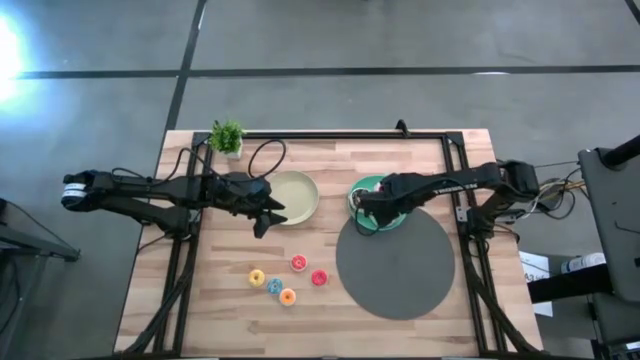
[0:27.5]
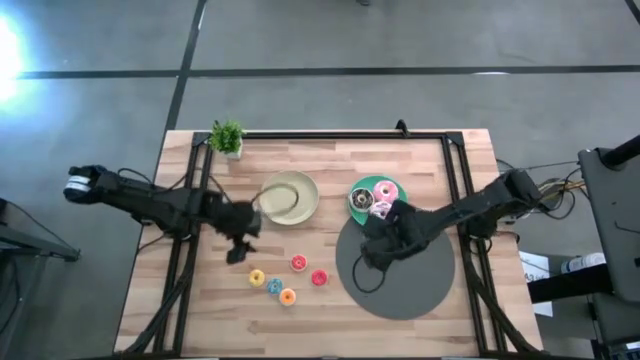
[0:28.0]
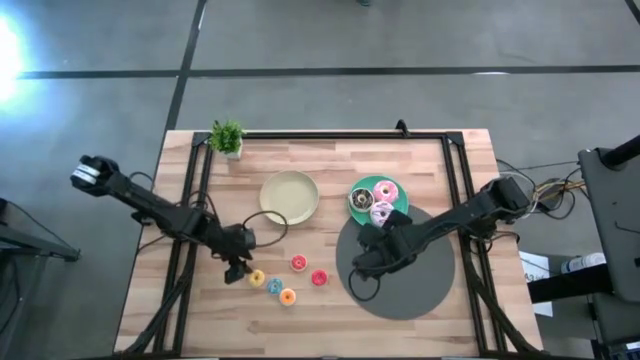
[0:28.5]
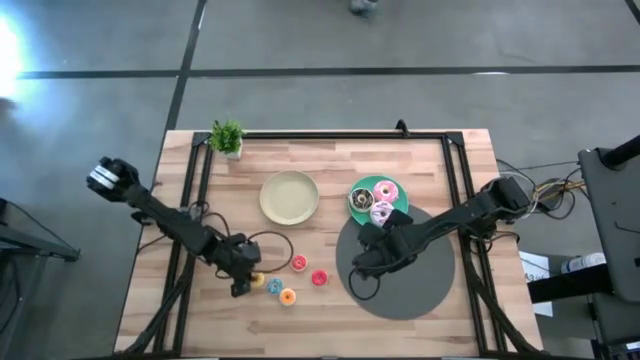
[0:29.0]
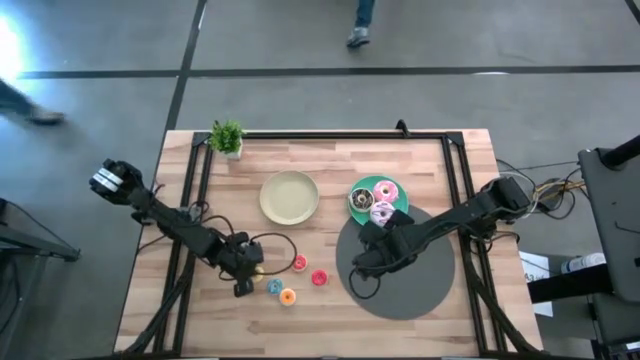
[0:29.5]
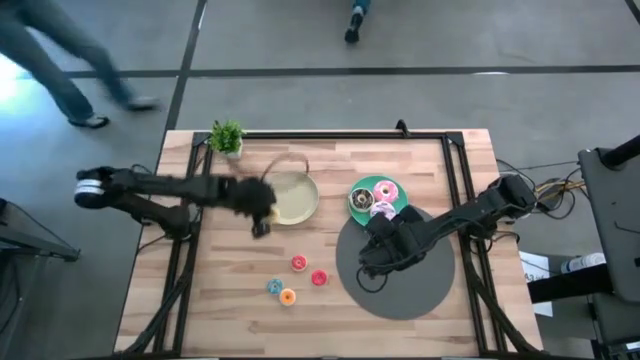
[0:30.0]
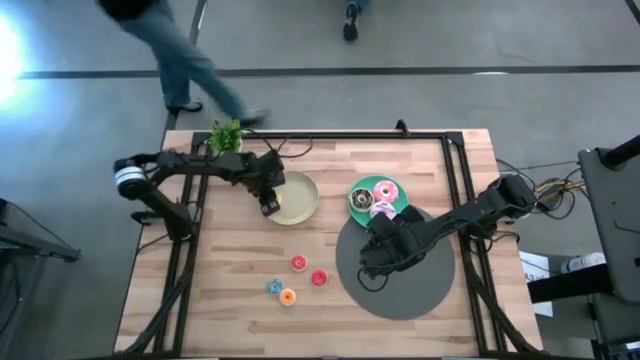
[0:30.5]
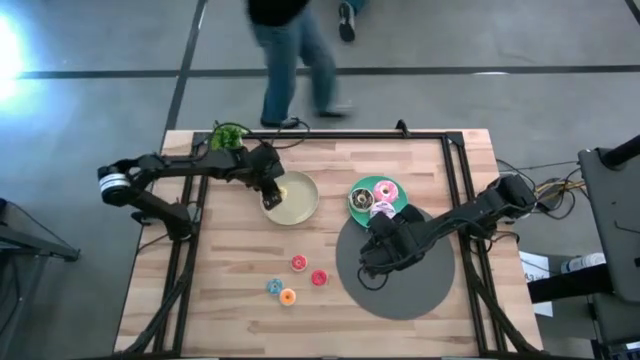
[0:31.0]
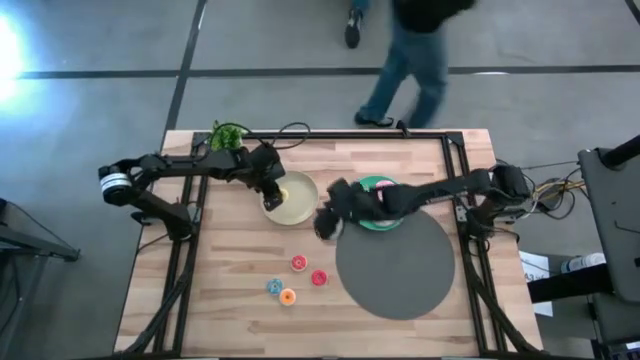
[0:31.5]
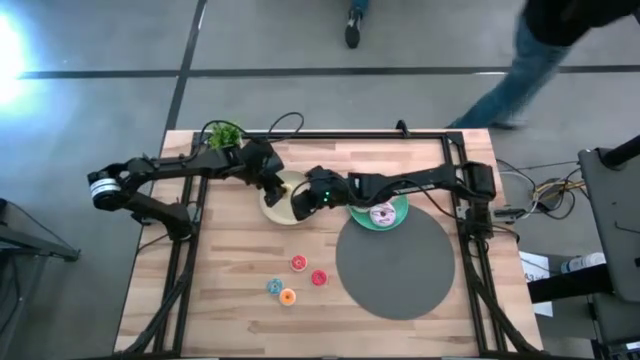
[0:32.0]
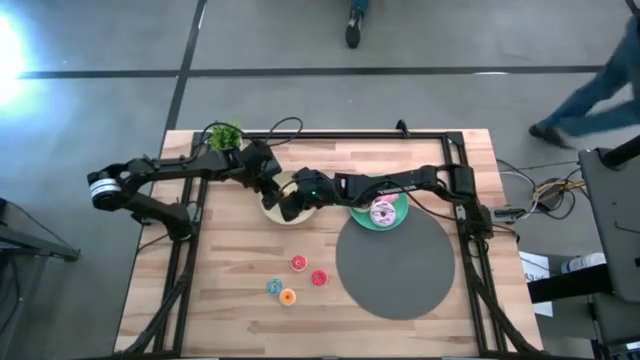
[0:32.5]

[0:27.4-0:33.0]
Task: Pick & Place donuts
Put the small yellow donut on the white plate

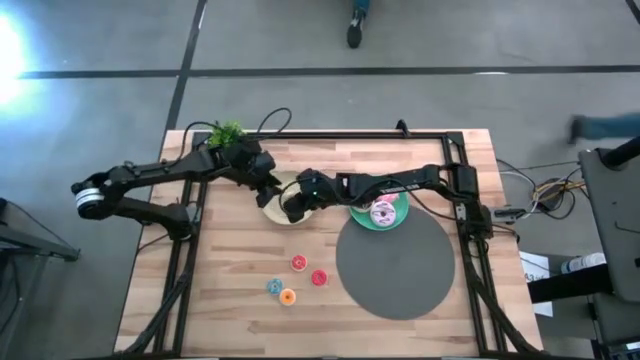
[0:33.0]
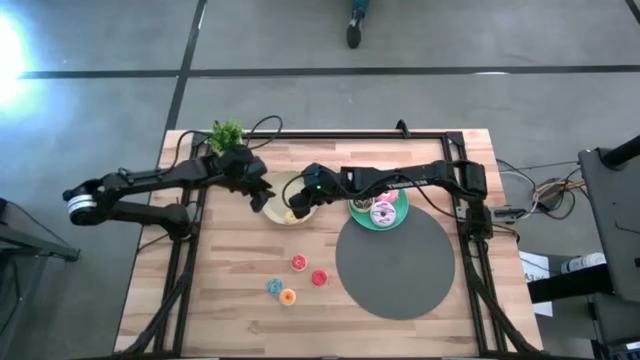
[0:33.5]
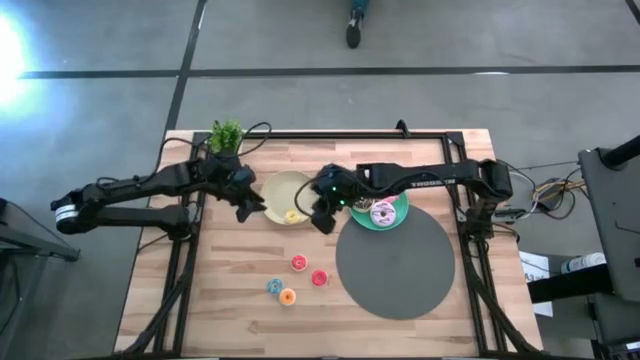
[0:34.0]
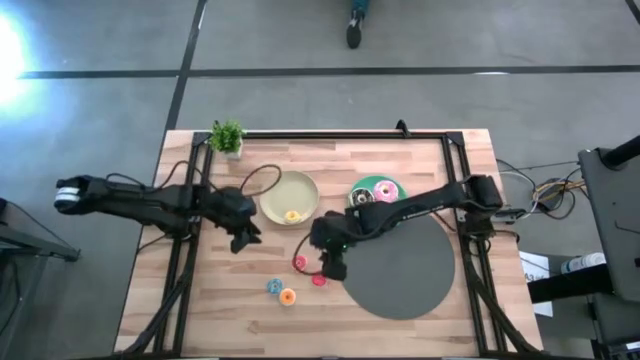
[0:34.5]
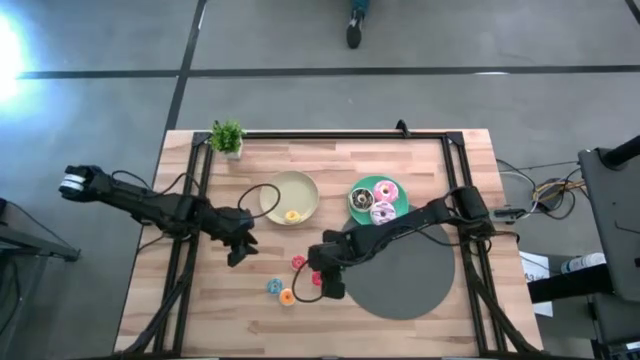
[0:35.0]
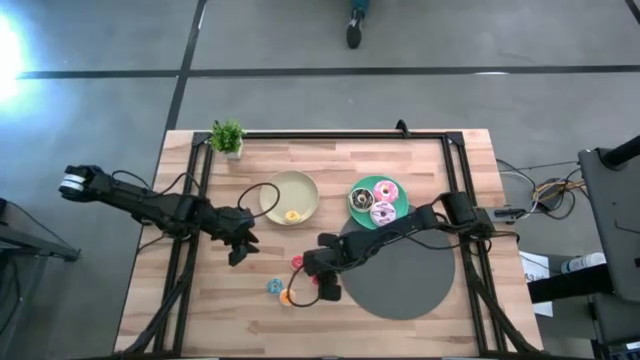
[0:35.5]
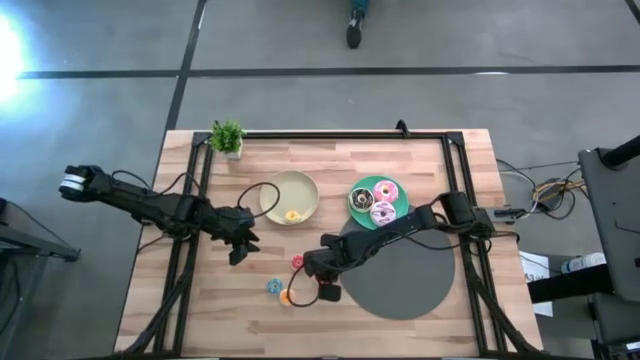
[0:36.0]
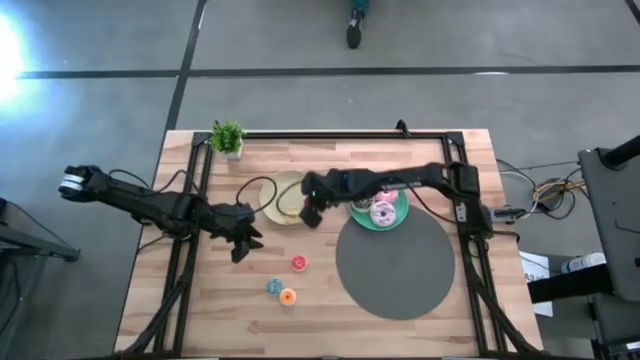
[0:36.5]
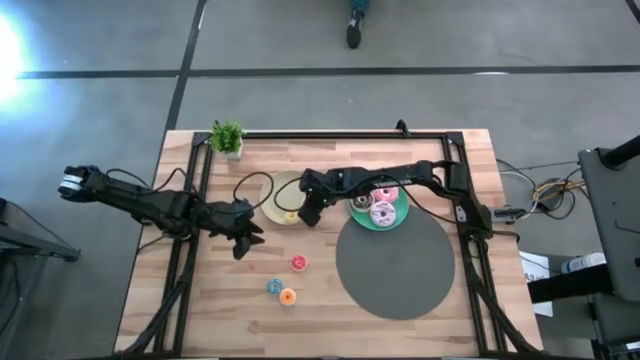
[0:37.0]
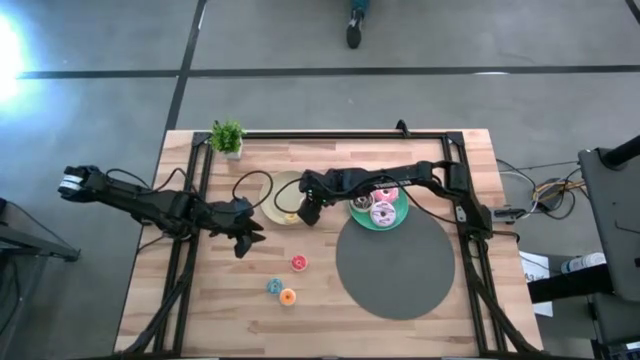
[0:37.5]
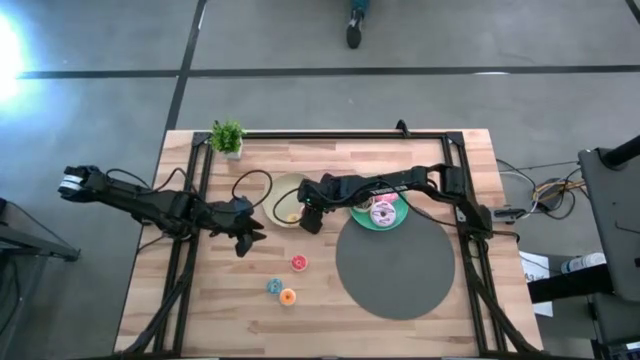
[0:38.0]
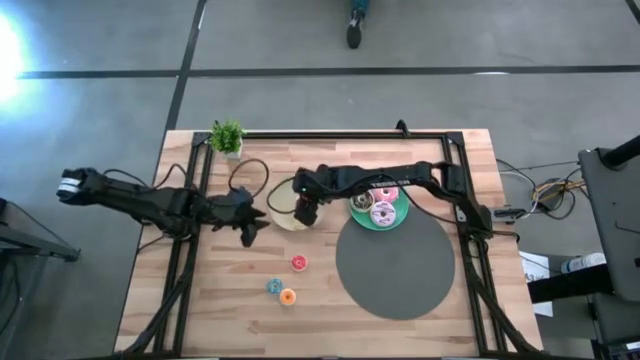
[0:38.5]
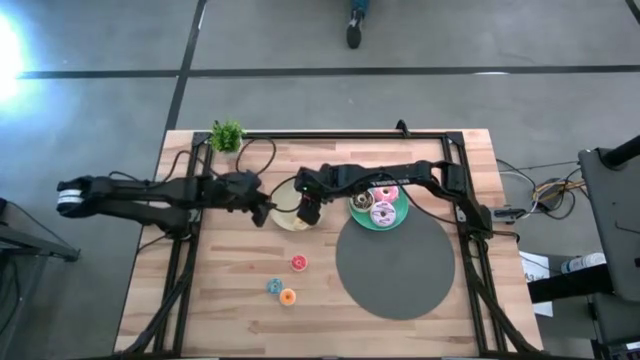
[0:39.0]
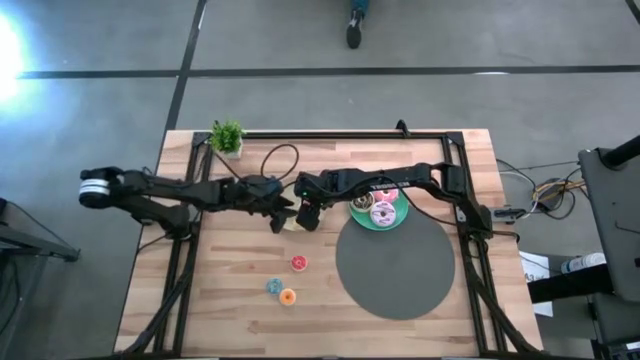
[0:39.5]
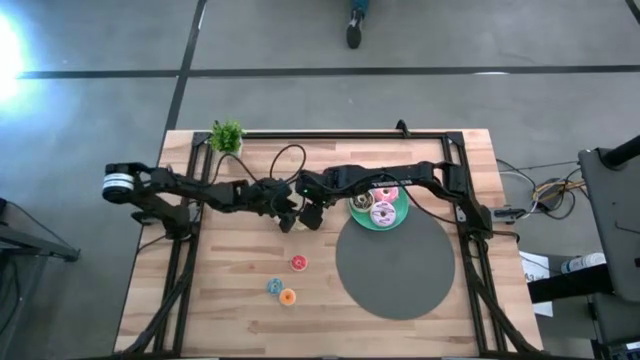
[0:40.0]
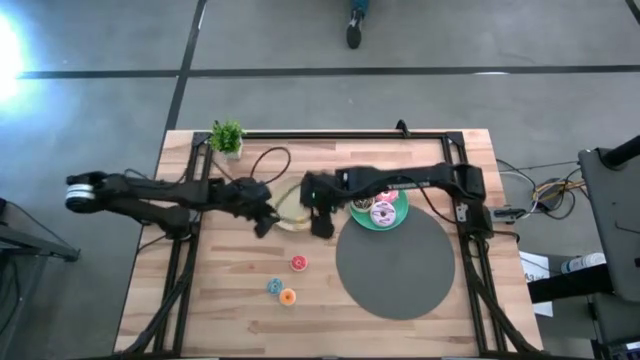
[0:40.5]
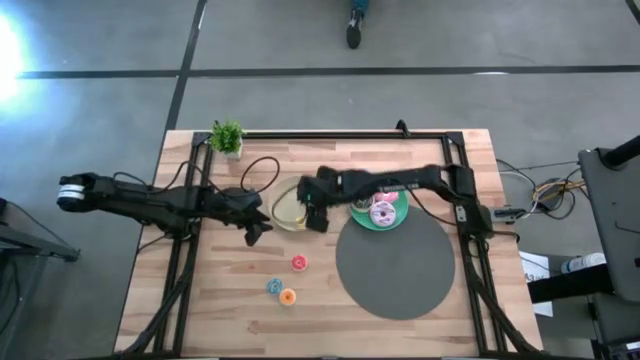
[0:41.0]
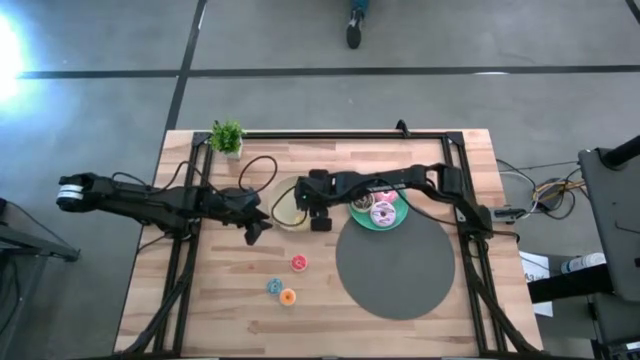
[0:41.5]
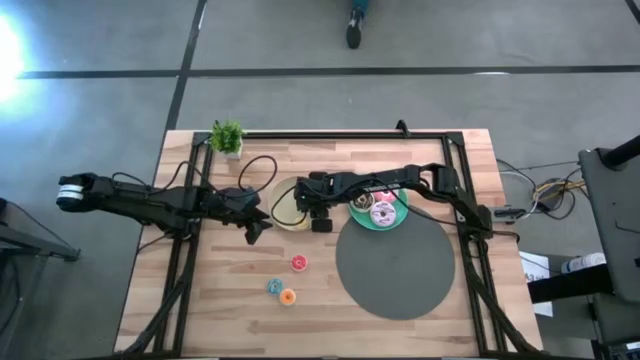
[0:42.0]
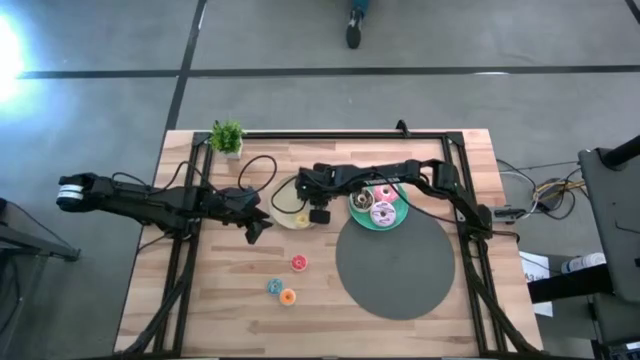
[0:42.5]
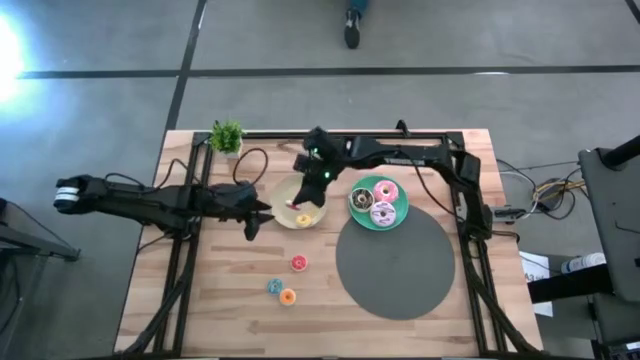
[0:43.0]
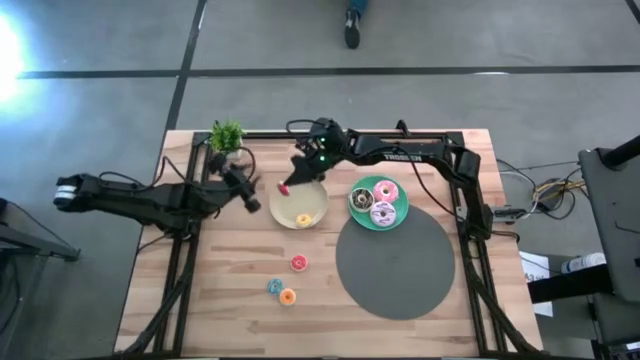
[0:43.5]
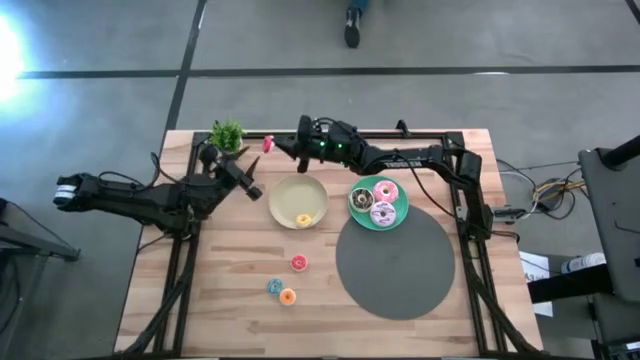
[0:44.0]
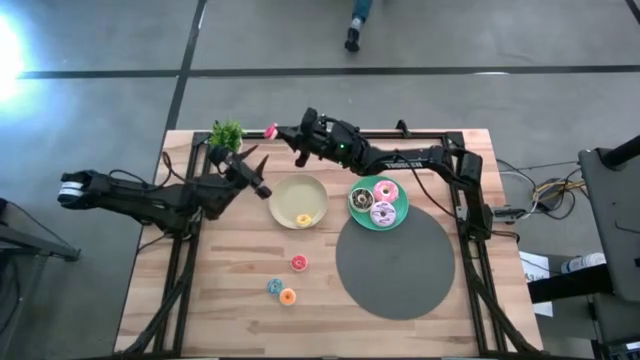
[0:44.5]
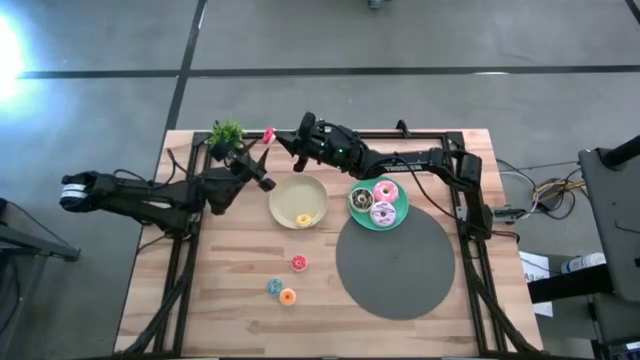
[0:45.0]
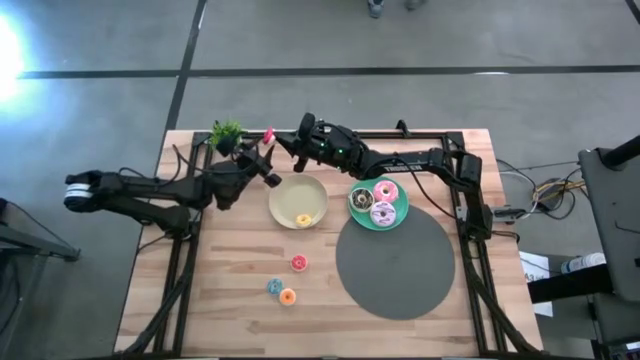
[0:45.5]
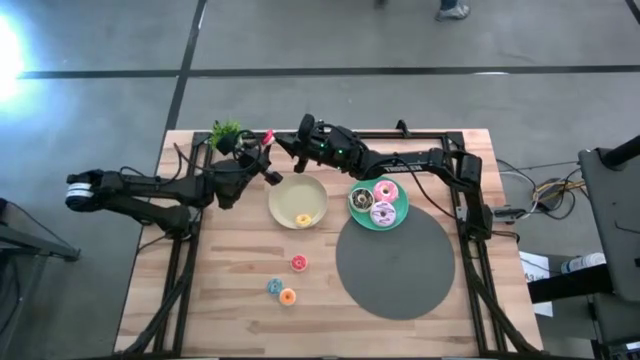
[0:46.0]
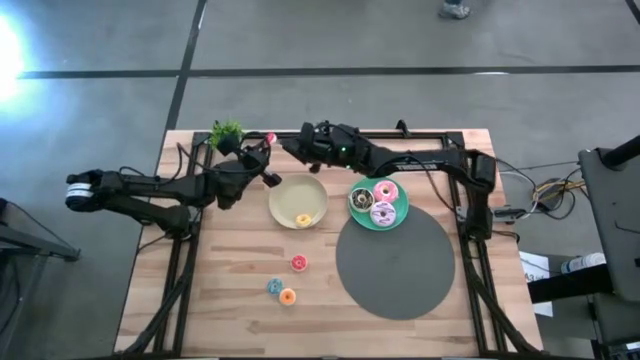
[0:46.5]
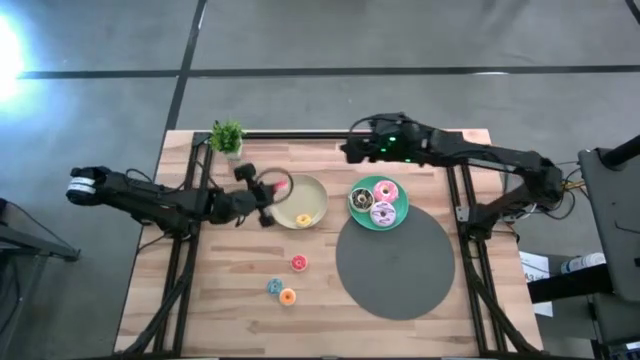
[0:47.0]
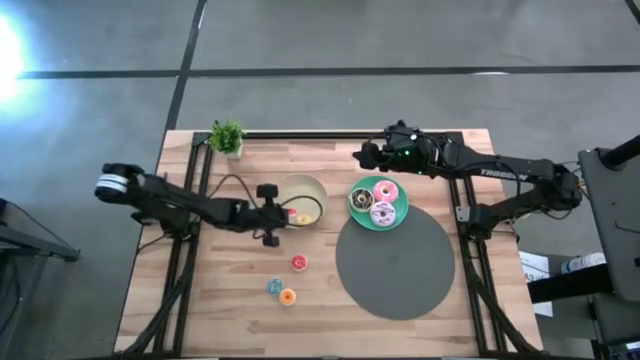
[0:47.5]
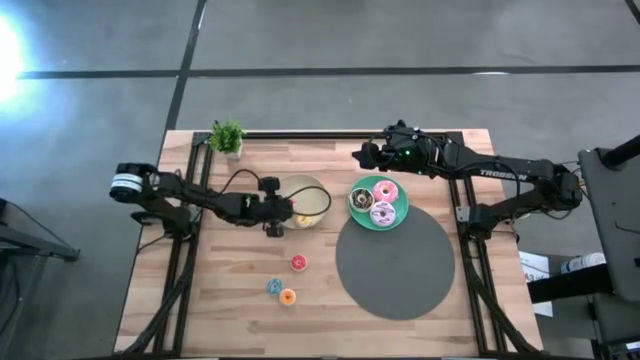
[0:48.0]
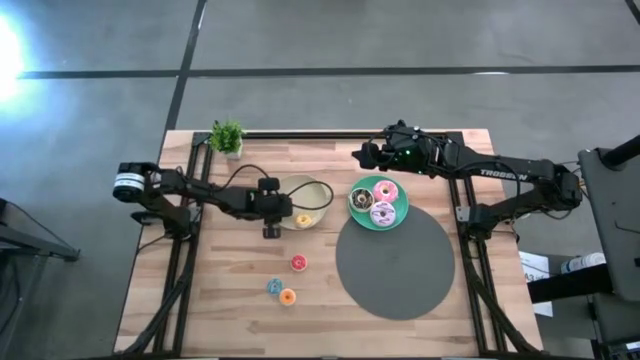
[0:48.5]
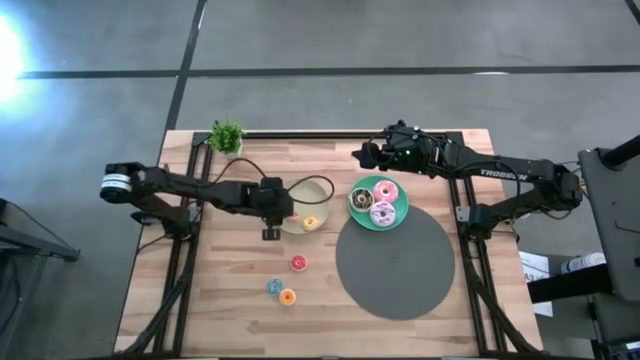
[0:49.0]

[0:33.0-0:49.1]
Put the small red donut on the white plate
